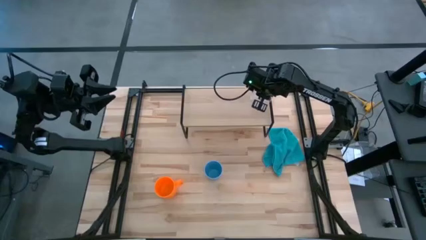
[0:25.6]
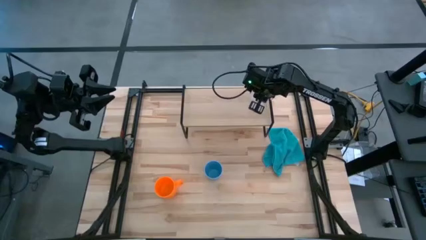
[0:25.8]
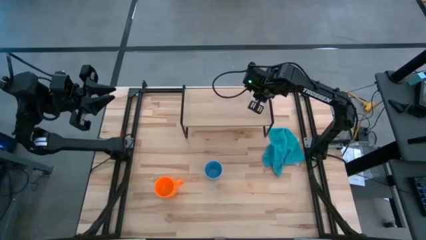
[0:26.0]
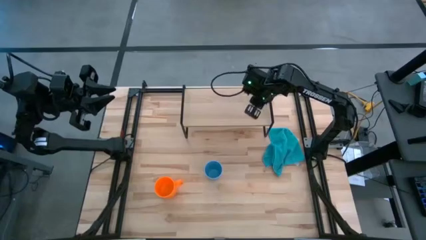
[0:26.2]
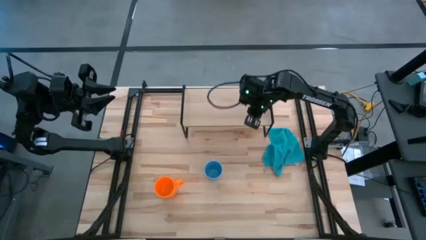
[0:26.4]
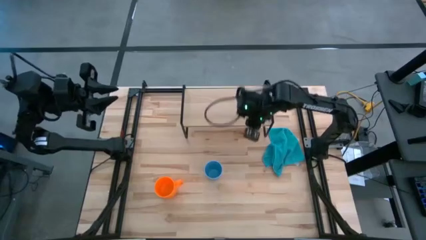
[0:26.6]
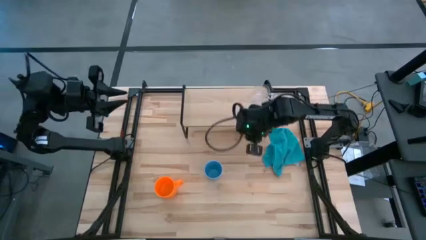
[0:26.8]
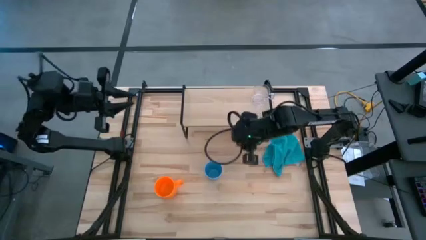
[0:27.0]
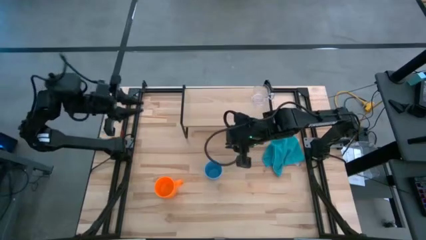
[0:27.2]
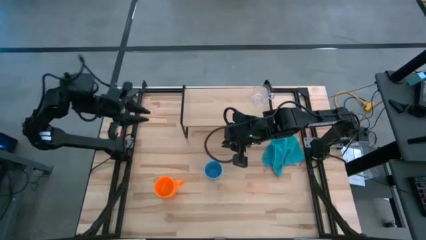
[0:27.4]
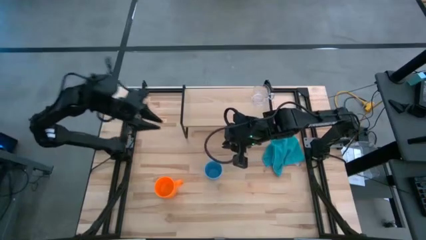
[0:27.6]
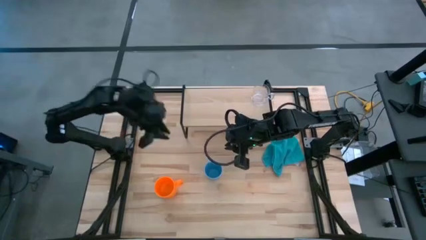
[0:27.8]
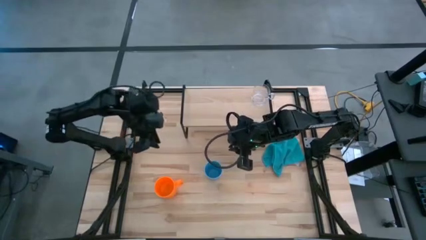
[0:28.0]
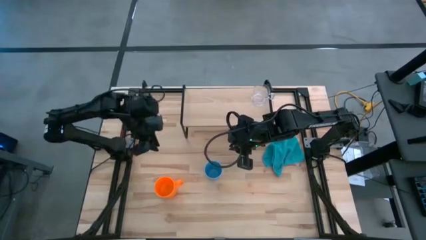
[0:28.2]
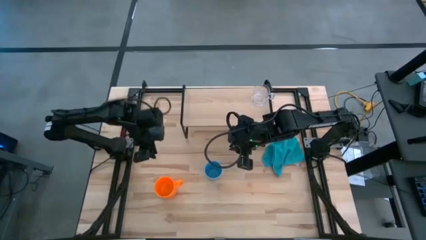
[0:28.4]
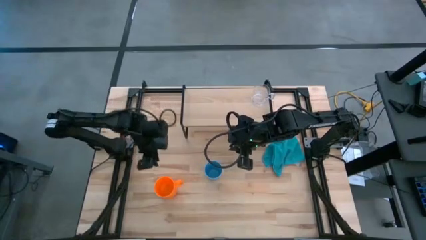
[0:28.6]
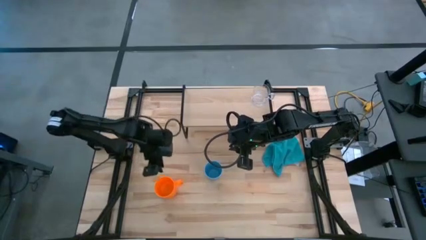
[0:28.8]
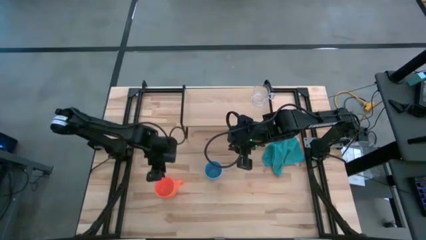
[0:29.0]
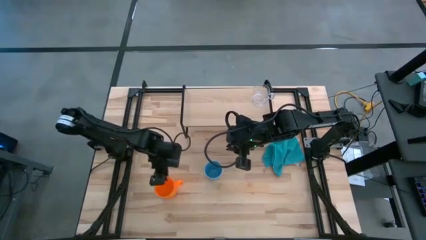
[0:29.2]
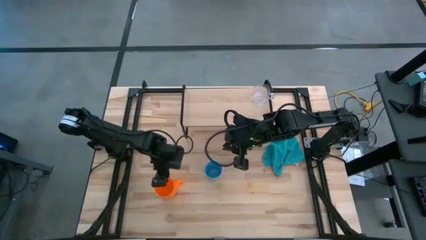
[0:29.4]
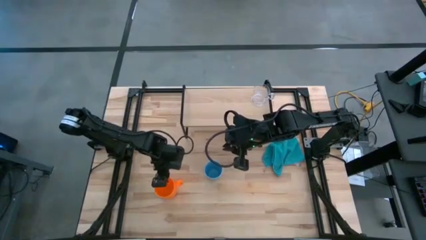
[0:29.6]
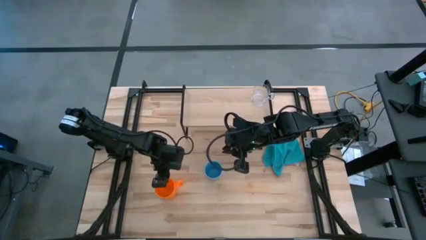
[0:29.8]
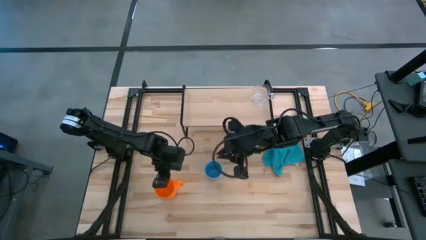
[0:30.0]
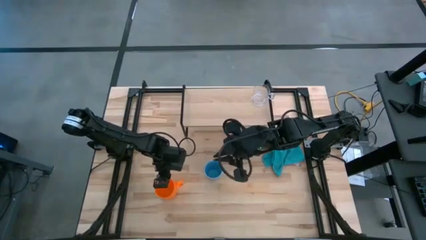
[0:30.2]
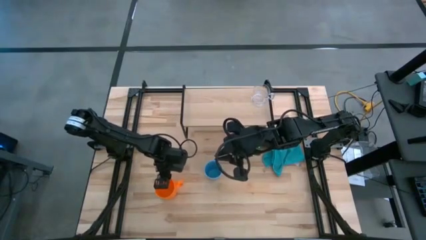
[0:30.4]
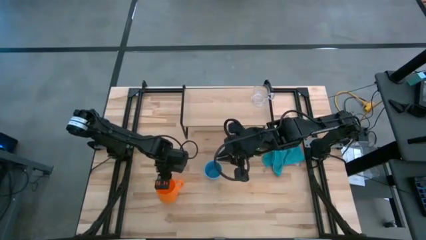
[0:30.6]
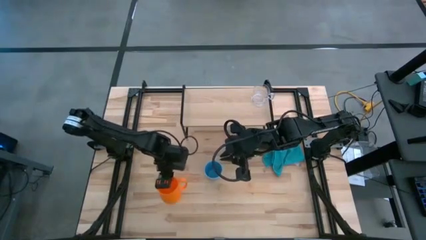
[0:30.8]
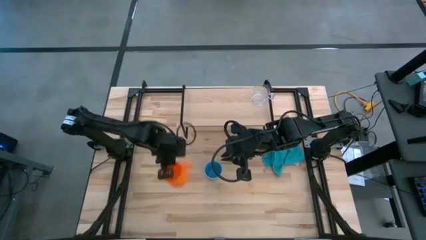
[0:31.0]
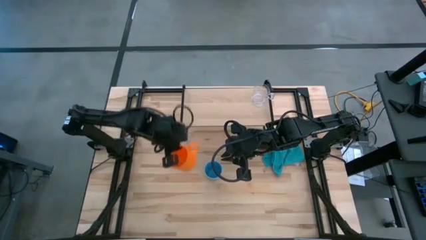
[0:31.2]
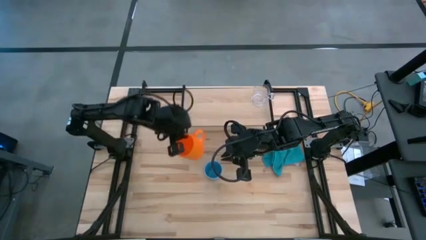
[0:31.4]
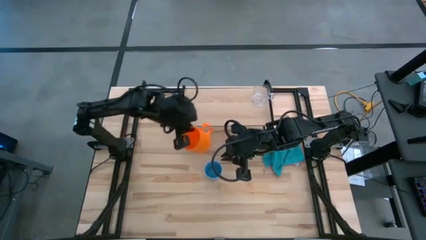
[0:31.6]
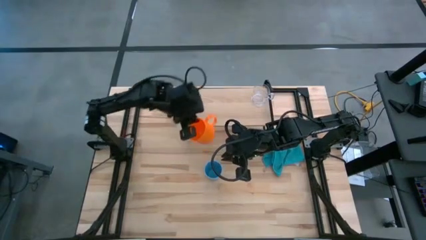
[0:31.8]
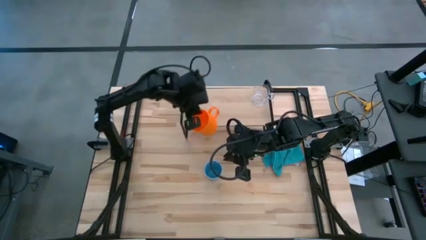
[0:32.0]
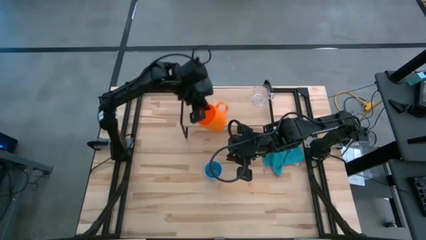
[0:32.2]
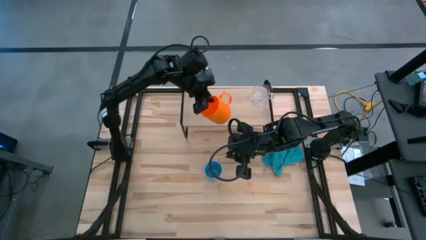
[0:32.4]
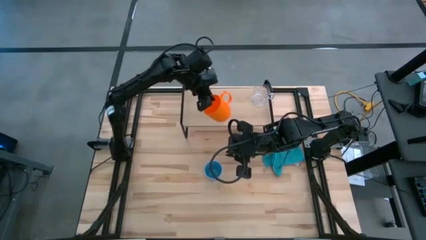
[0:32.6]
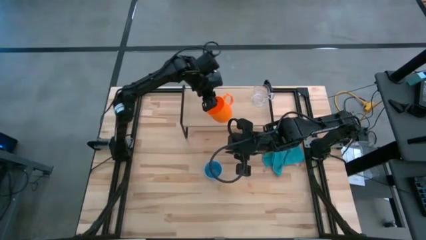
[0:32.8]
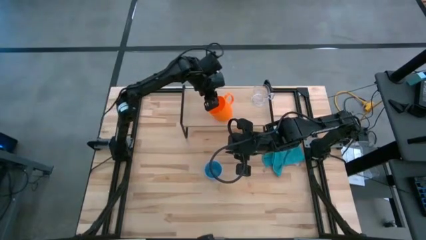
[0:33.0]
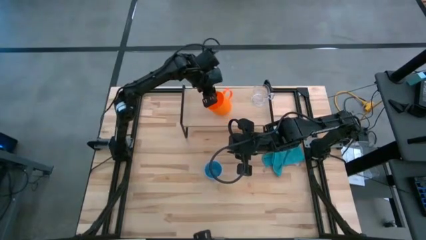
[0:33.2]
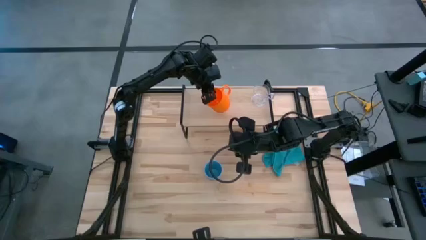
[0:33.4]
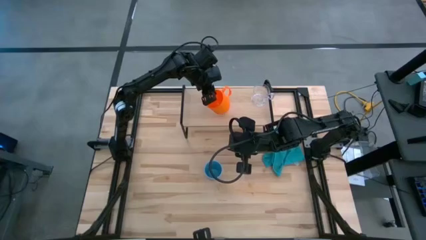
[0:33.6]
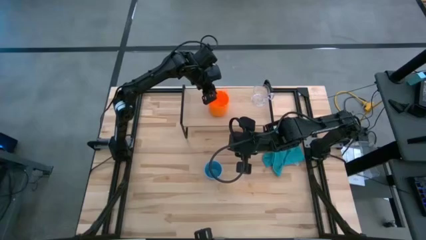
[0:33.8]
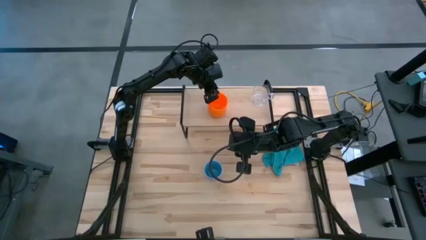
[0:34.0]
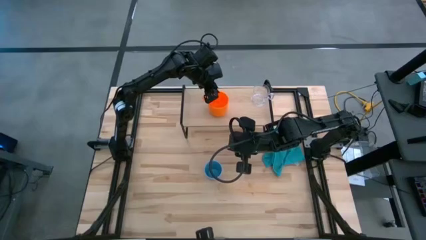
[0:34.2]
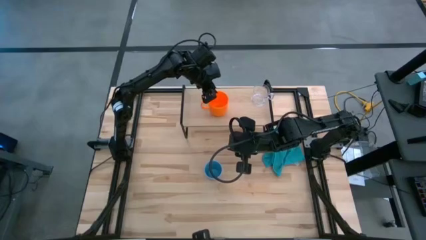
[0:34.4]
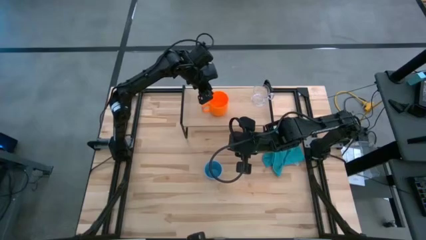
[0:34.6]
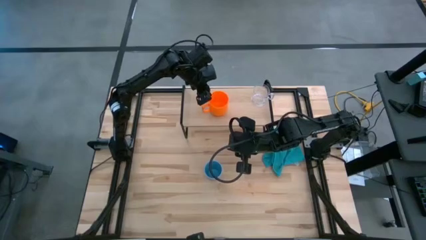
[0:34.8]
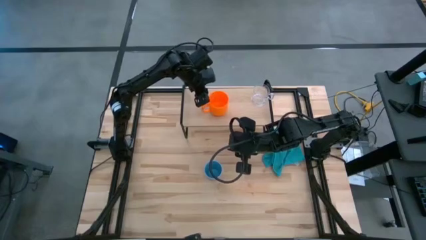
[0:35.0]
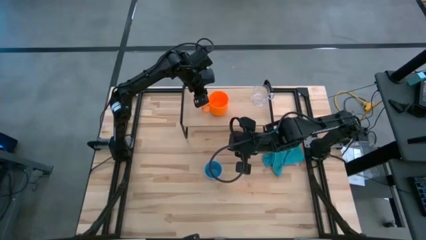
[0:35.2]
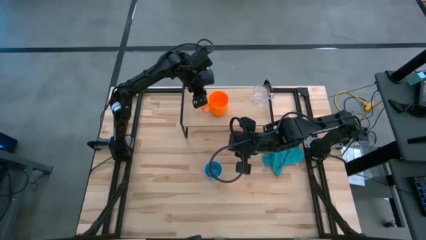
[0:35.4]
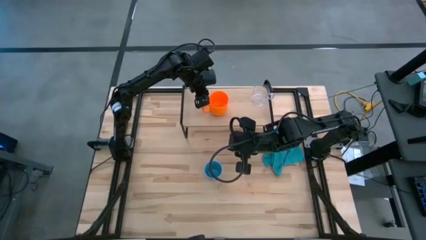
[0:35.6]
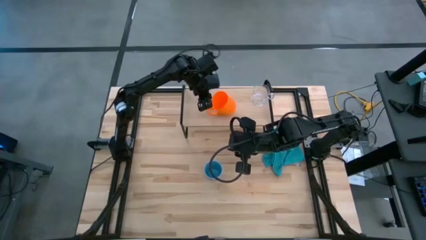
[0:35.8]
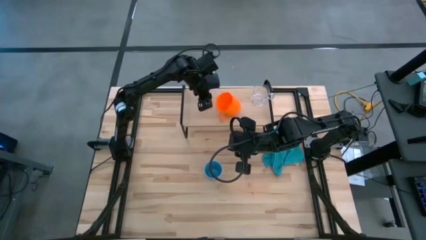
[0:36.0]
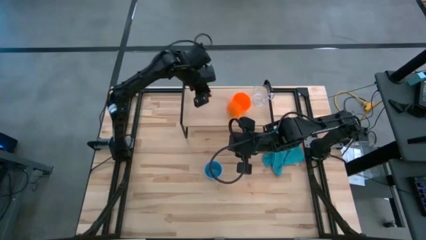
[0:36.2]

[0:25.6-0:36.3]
Task: Stack small to large cups/mugs on shelf
Put the orange mug on the shelf
